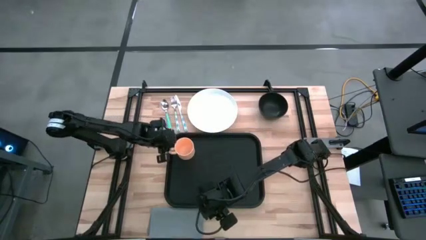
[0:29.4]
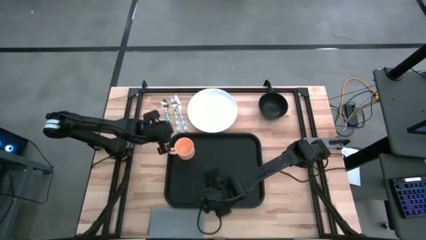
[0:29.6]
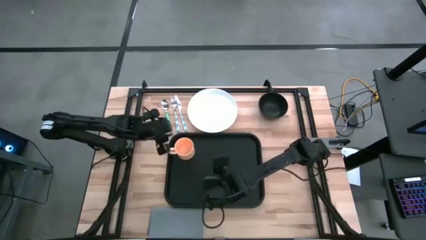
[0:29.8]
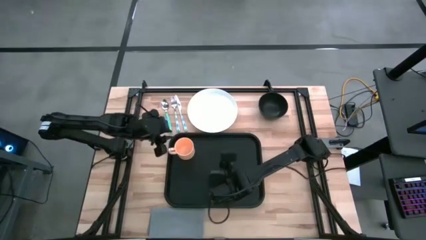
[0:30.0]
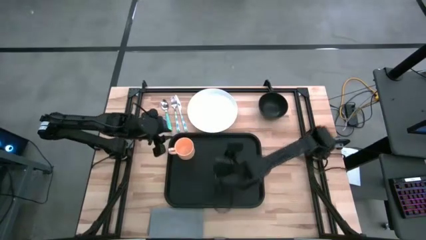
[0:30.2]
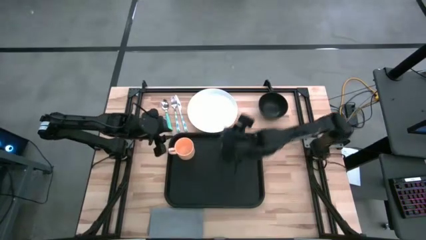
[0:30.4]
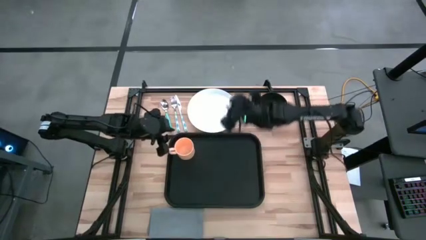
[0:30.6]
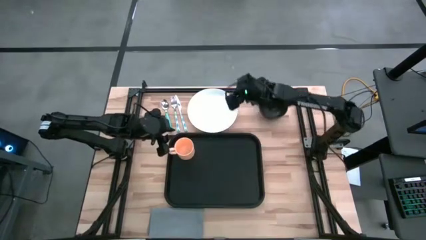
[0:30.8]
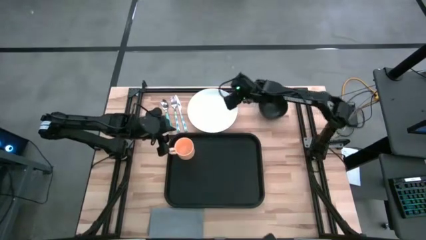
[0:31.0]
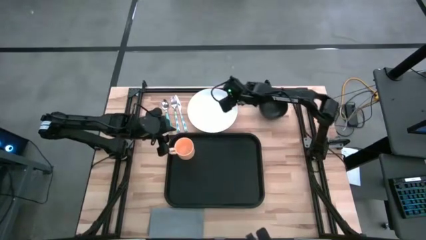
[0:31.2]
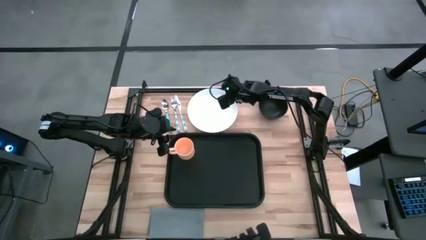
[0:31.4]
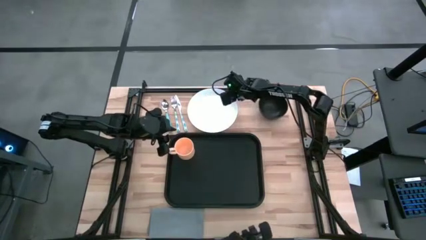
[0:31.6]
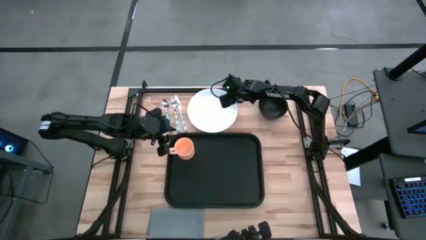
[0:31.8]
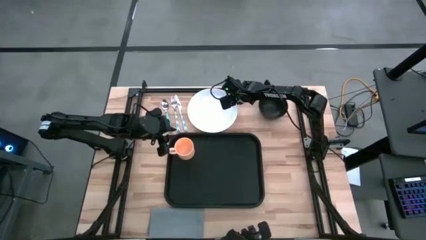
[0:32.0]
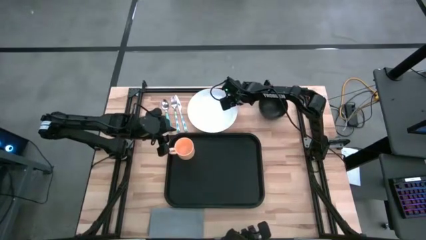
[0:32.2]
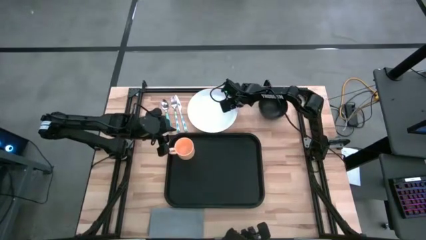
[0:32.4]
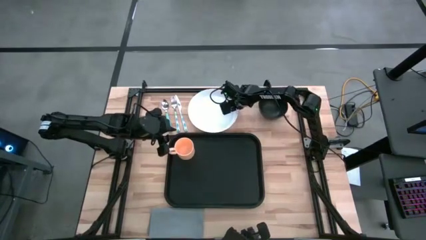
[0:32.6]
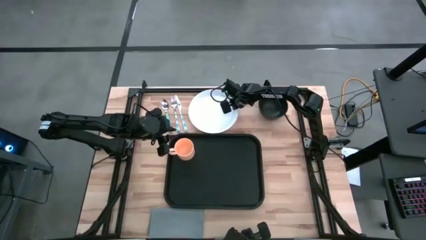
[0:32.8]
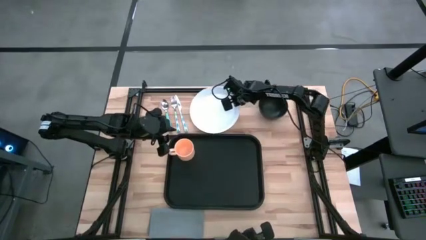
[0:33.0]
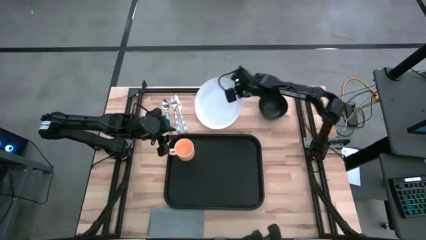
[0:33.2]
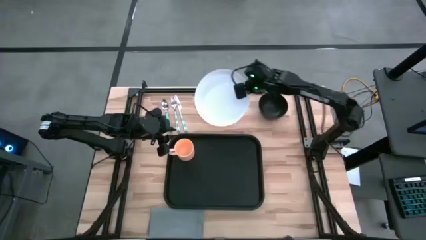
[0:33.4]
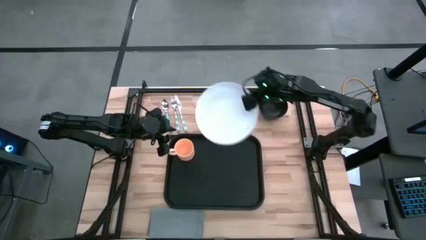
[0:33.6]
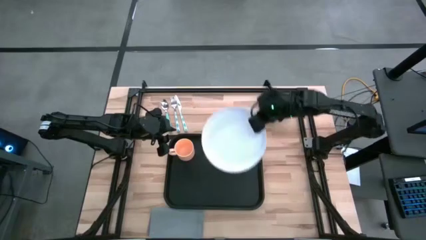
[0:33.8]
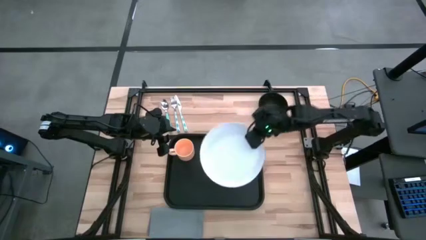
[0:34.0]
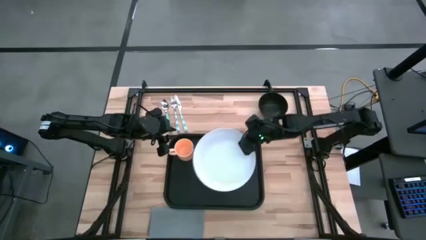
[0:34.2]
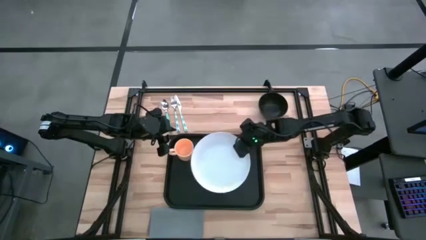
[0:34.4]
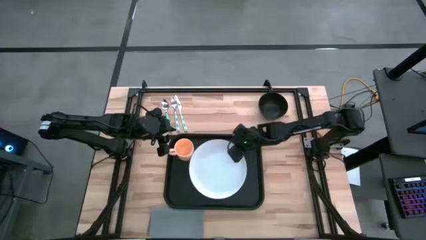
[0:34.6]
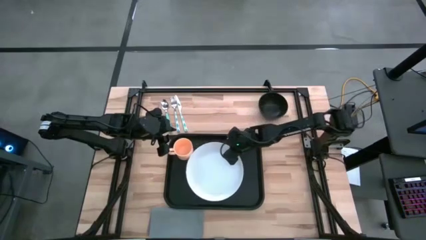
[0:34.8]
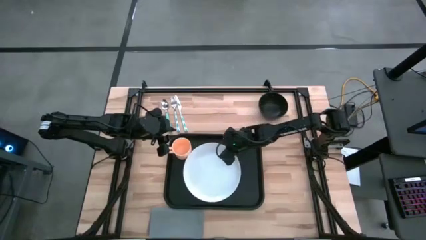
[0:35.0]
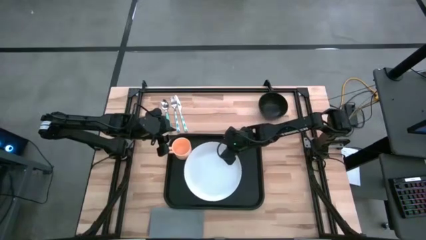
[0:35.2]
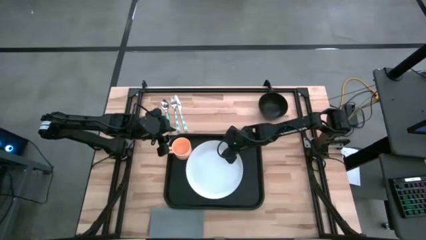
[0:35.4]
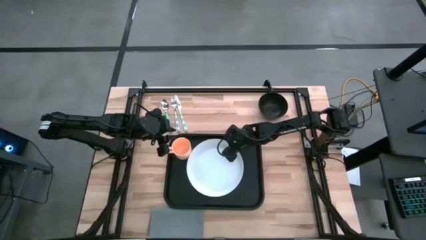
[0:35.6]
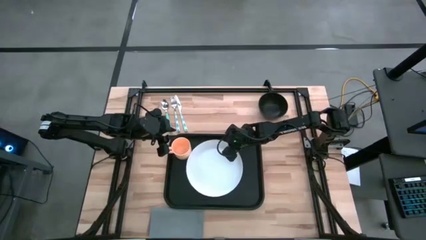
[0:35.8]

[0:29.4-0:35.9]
Task: Set up tray
Put the white plate to the bottom right of the orange mug on the black serving tray

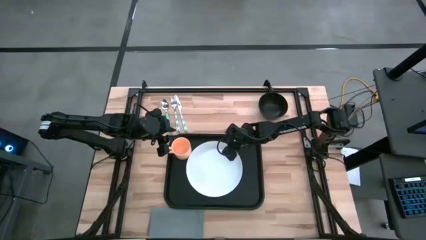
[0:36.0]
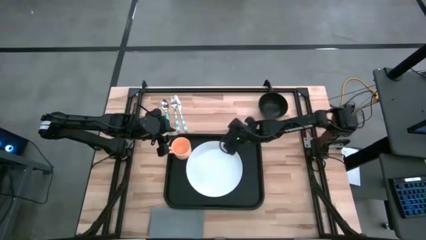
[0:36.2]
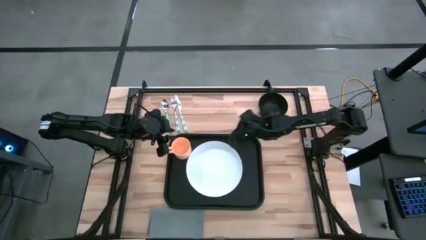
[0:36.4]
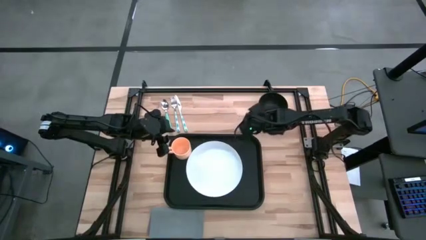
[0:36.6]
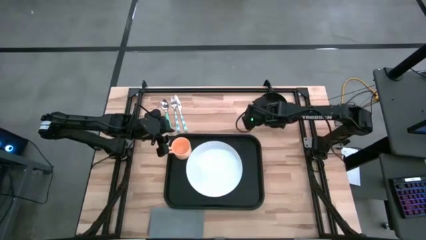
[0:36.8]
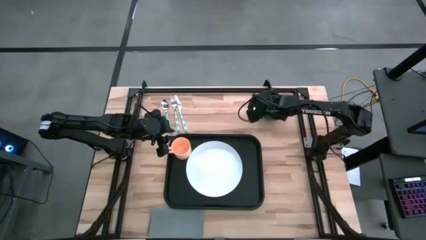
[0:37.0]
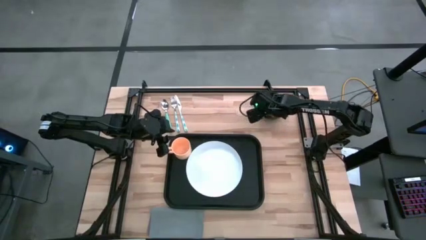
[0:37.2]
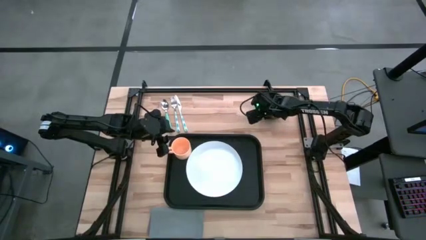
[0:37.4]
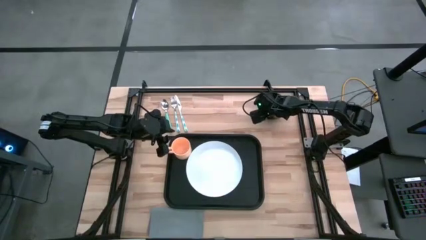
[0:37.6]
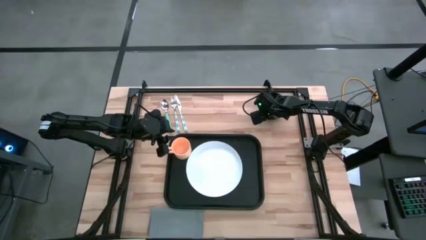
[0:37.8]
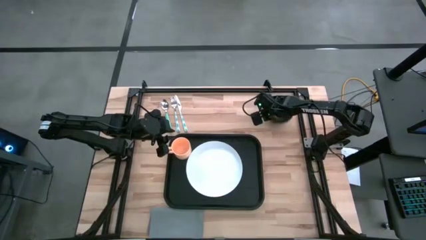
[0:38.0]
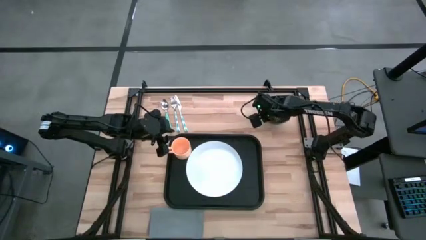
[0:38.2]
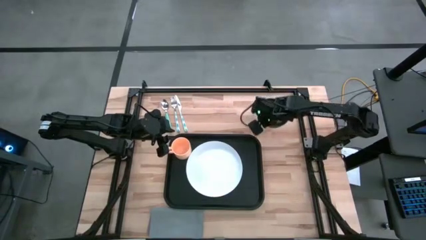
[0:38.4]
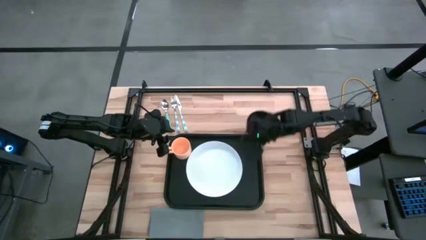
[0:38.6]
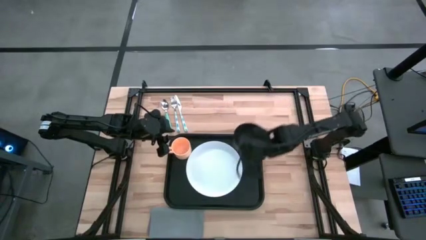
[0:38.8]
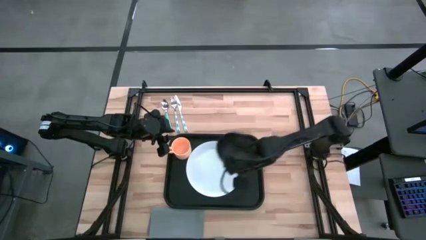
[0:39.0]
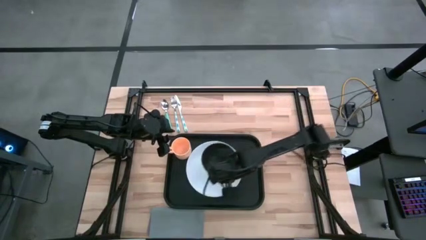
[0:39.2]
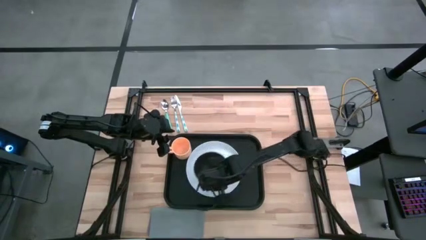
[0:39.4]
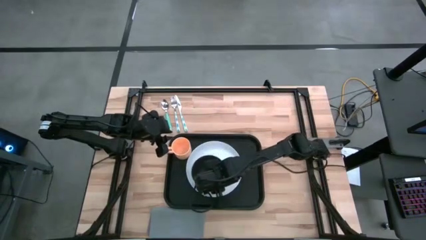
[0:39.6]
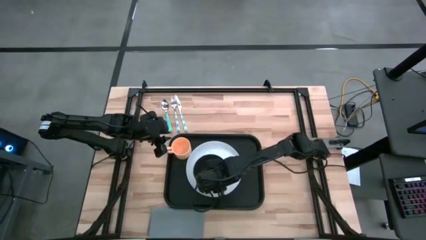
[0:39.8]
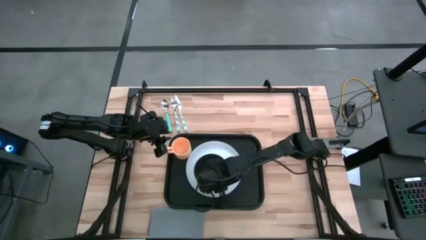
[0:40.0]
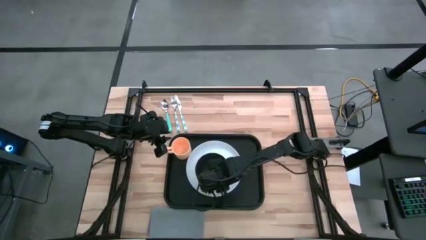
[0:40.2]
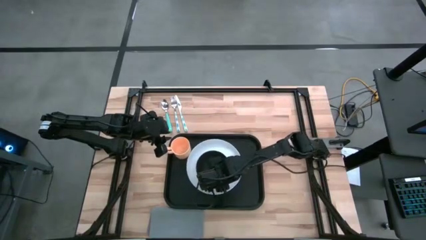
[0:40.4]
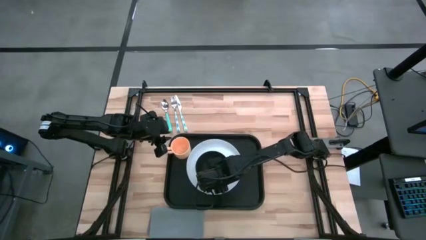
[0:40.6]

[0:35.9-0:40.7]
Put the black bowl on the white plate

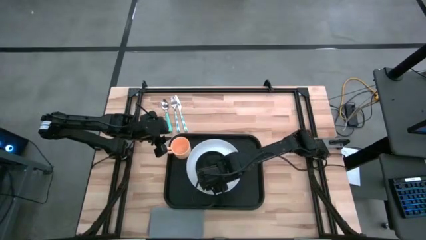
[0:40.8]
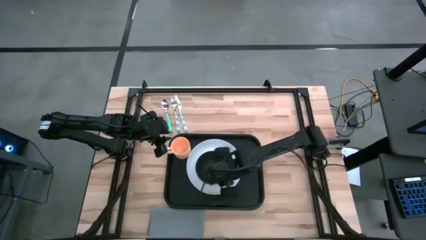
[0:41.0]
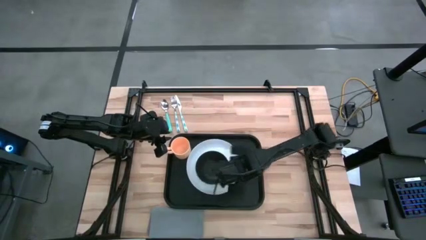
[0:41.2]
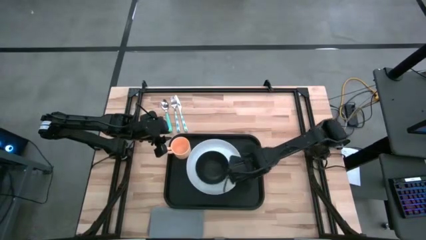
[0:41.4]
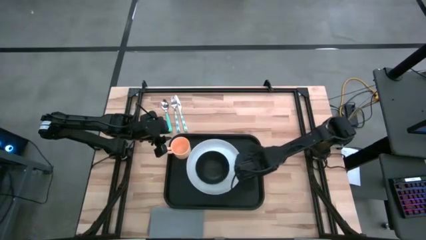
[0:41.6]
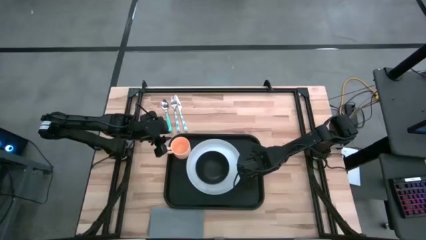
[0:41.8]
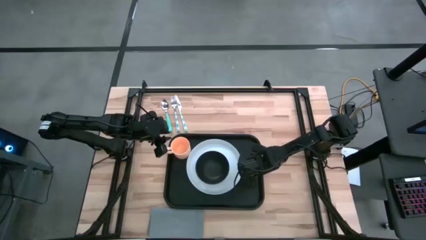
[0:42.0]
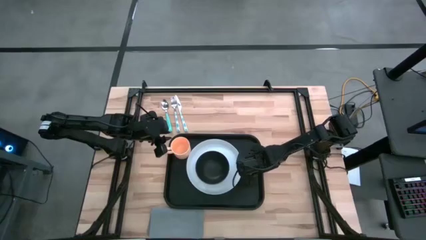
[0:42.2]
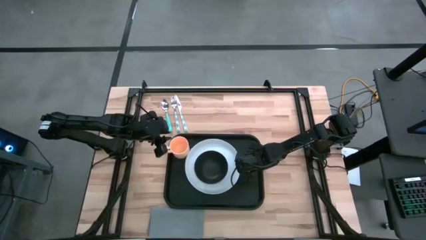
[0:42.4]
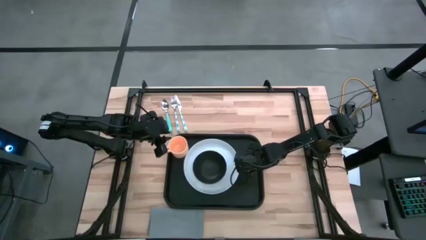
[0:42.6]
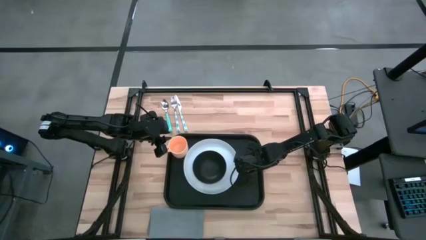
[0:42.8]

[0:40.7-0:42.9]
Adjust the white plate
